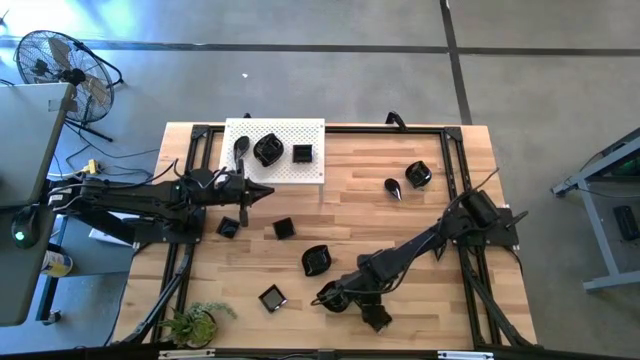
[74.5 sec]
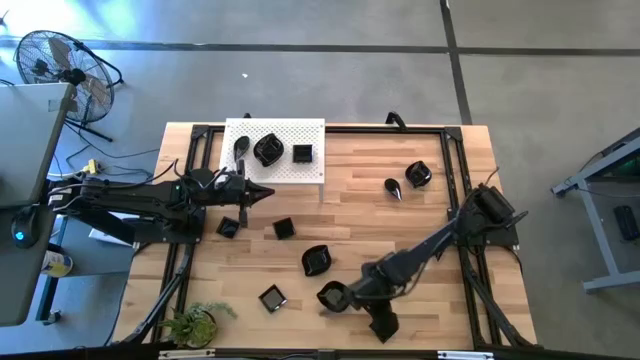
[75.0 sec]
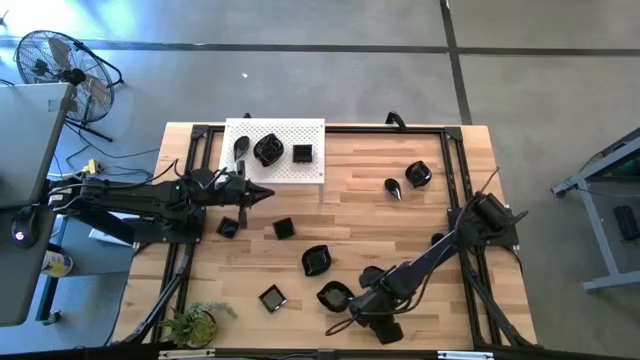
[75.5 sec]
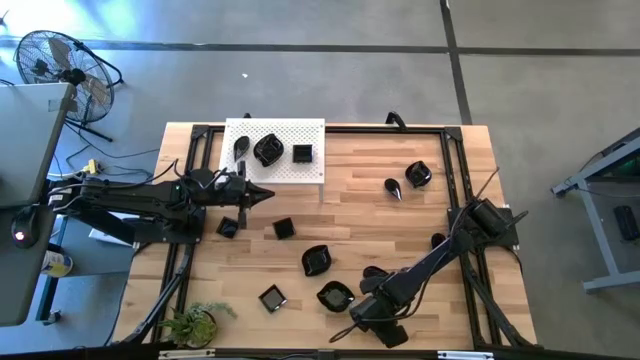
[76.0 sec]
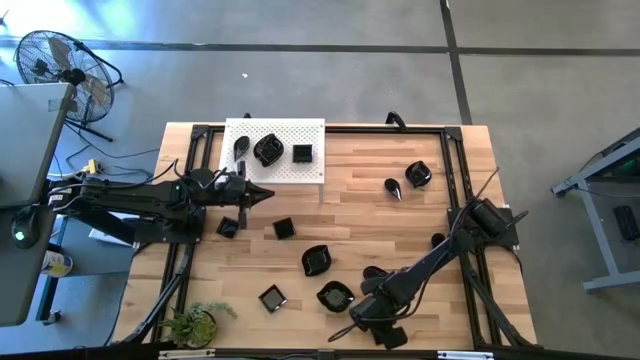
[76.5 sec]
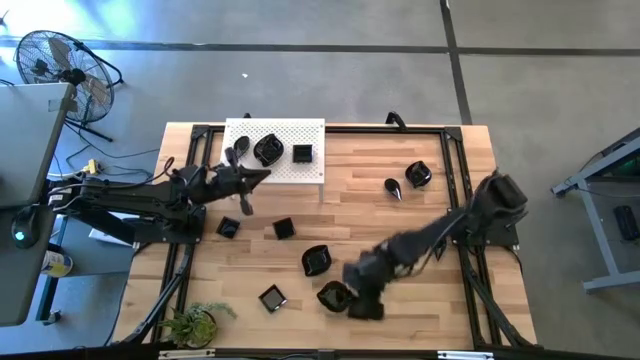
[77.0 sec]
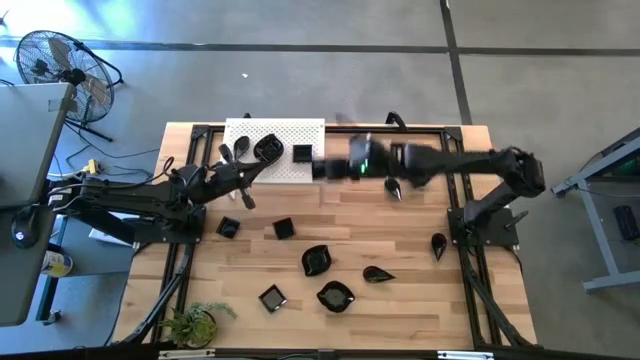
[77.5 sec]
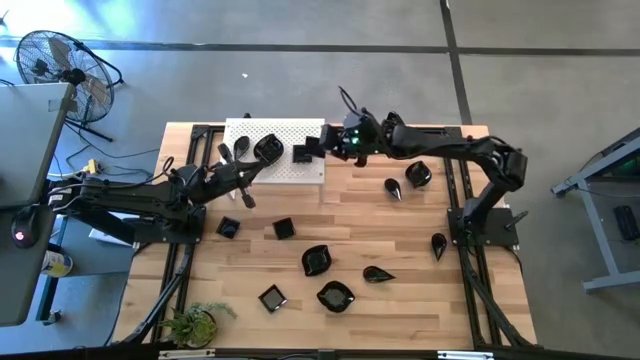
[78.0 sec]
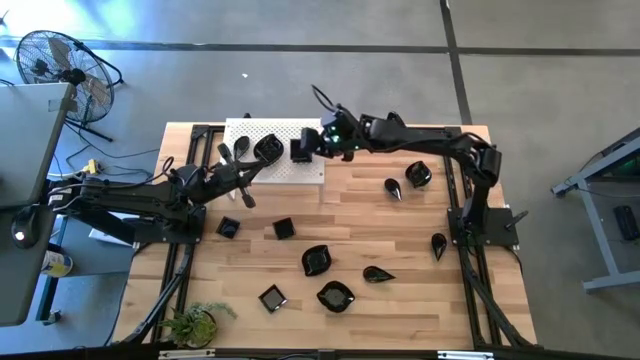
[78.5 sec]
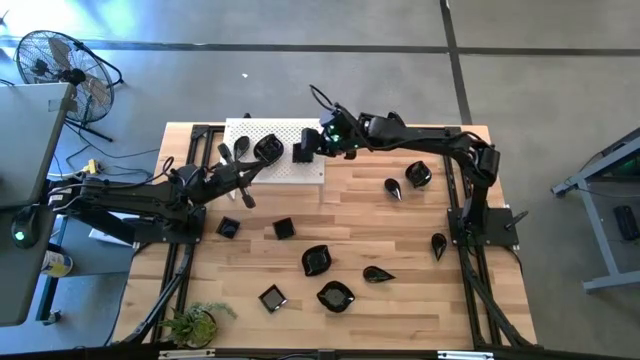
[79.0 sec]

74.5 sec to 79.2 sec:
Task: Pick & Place Mini shaped plates
Stack the square plate on top of the square plate on the shelf

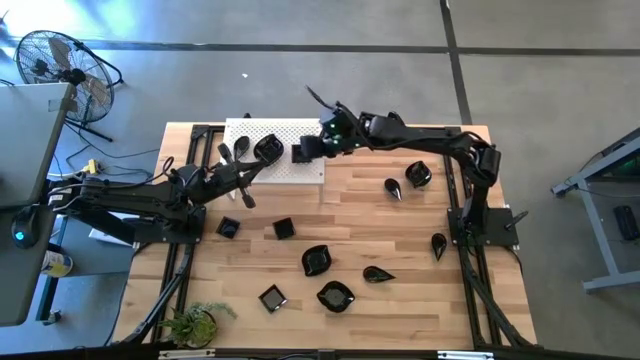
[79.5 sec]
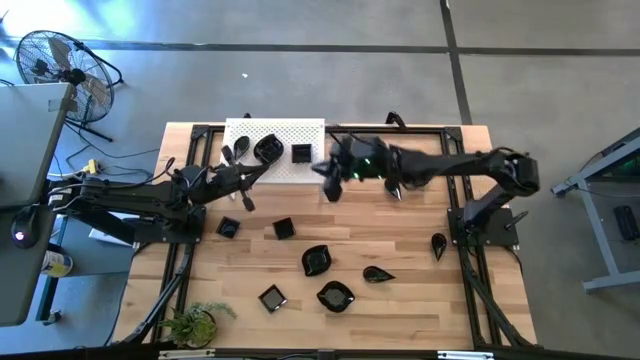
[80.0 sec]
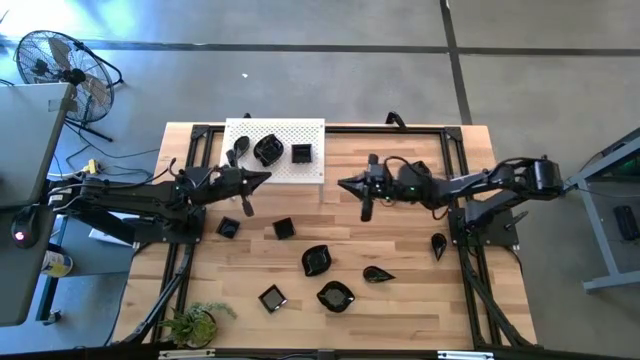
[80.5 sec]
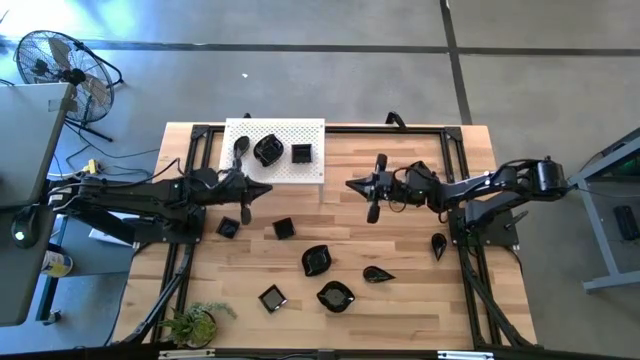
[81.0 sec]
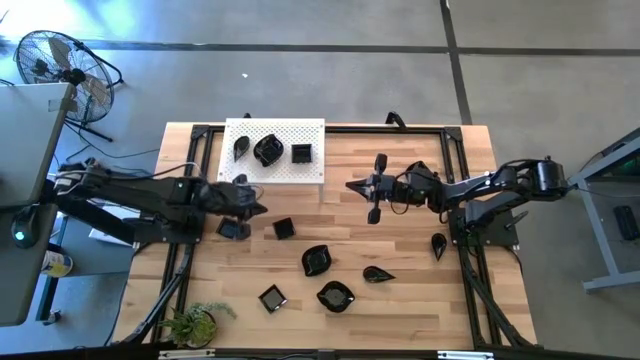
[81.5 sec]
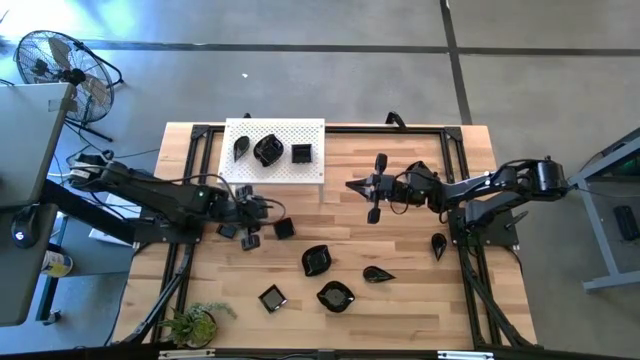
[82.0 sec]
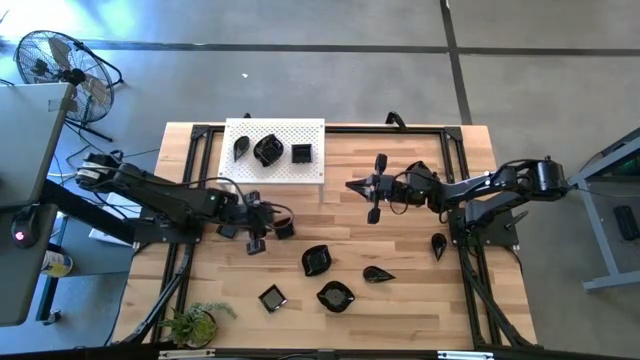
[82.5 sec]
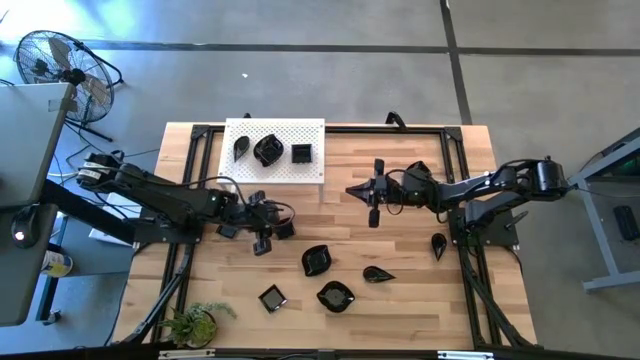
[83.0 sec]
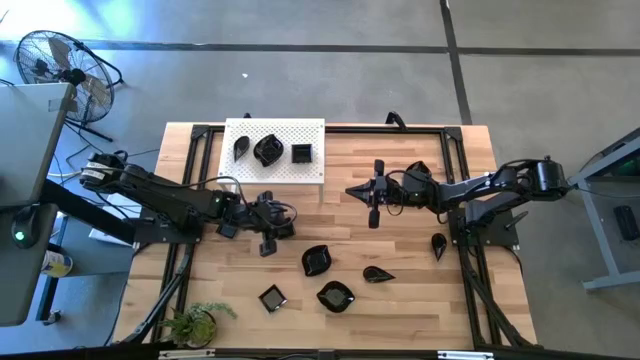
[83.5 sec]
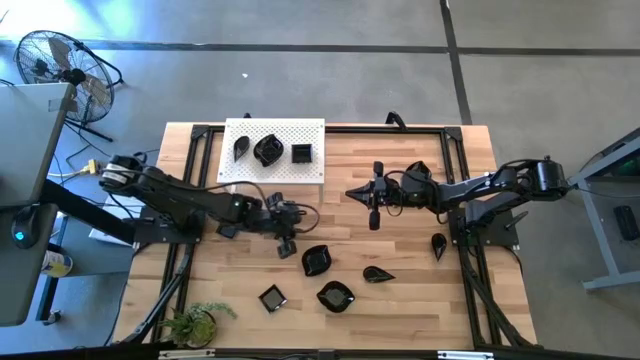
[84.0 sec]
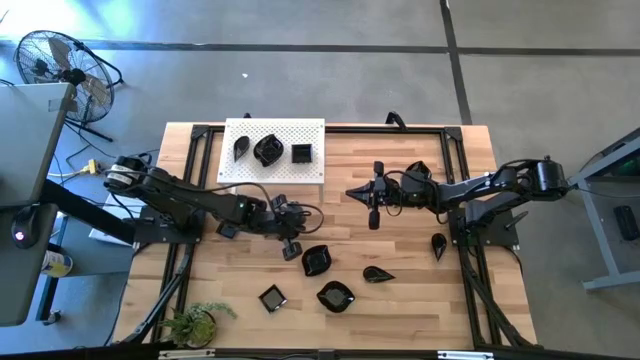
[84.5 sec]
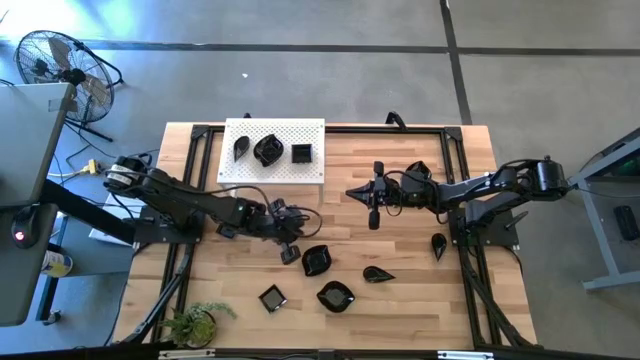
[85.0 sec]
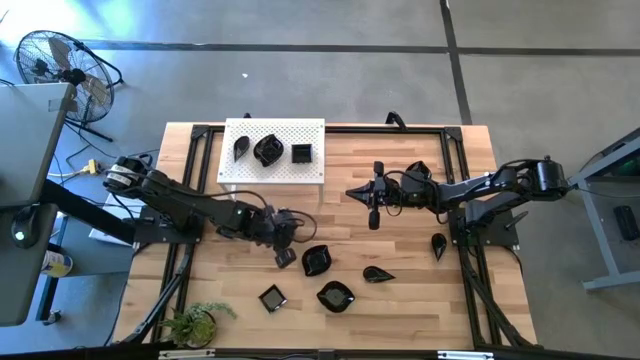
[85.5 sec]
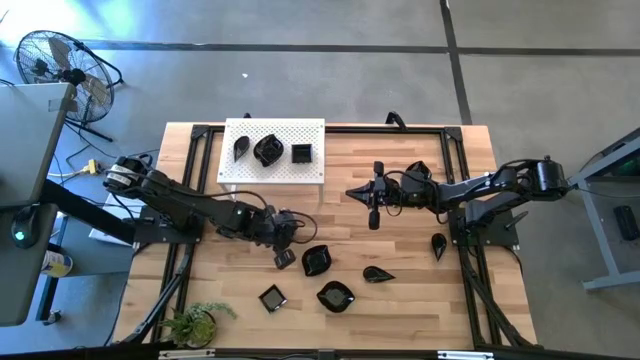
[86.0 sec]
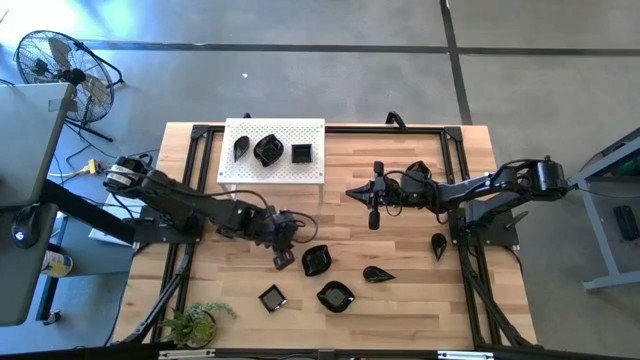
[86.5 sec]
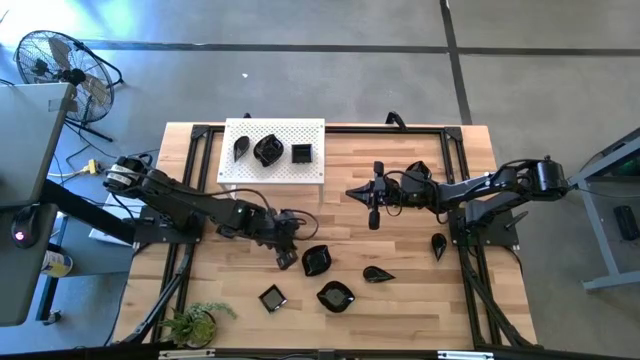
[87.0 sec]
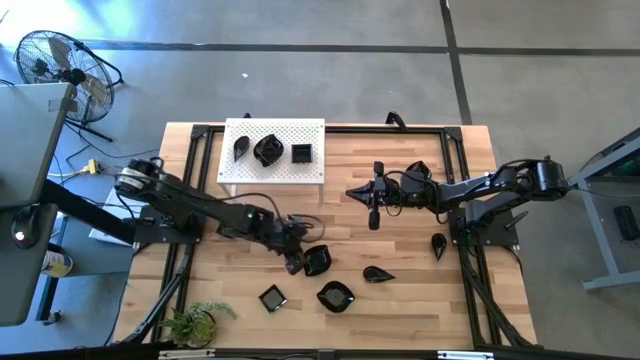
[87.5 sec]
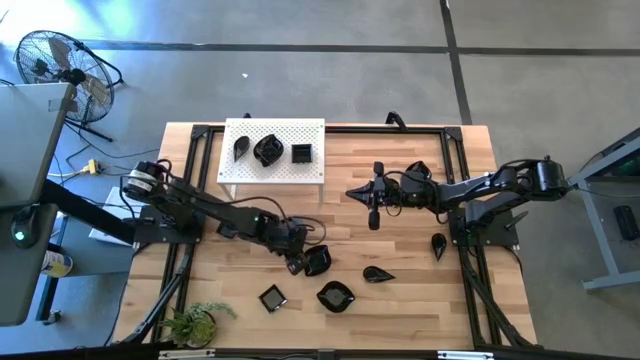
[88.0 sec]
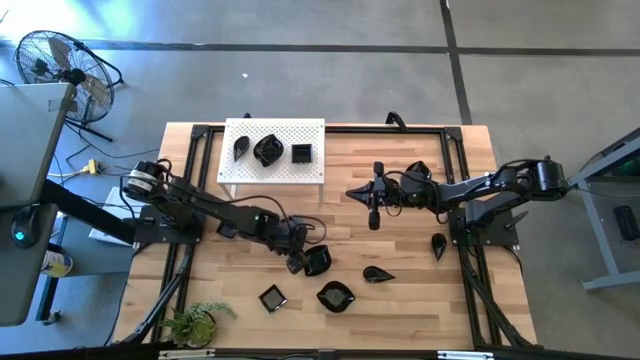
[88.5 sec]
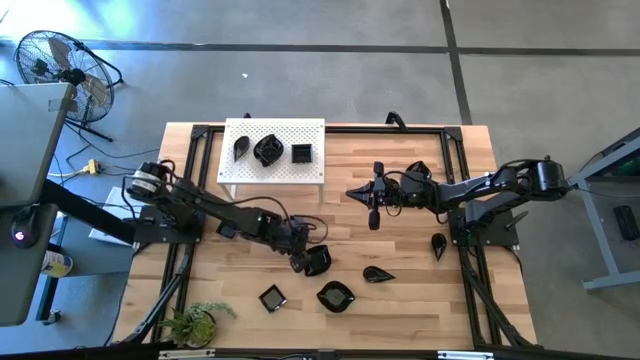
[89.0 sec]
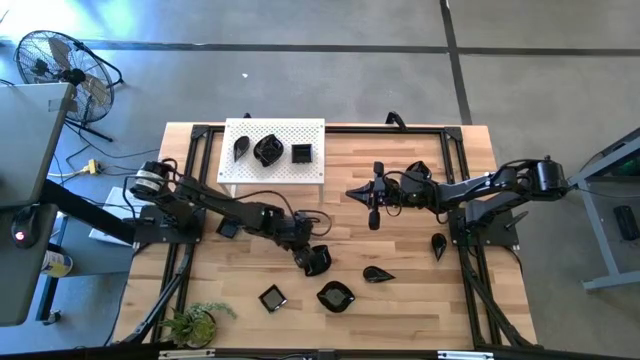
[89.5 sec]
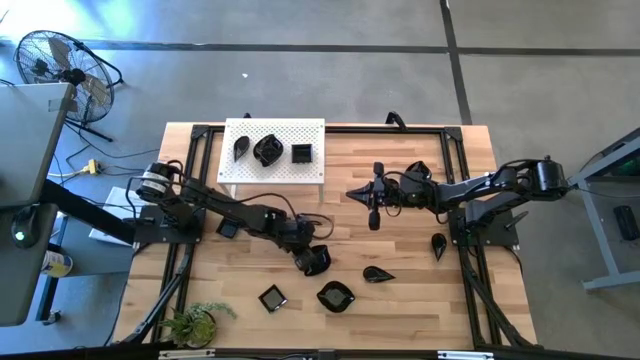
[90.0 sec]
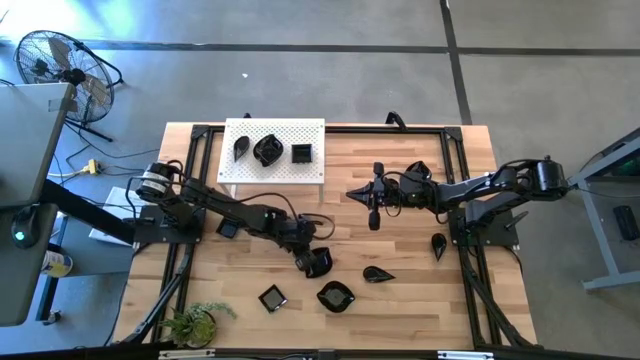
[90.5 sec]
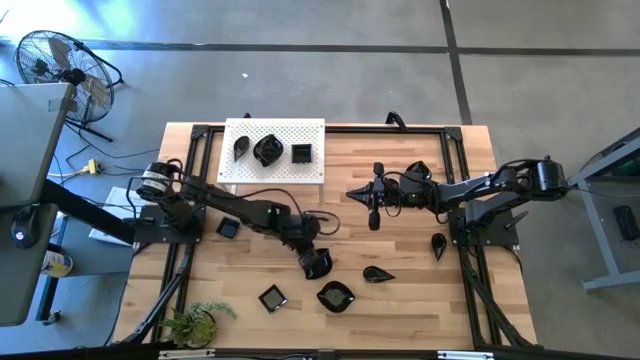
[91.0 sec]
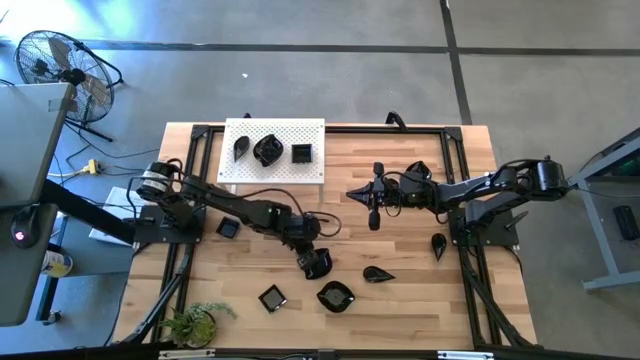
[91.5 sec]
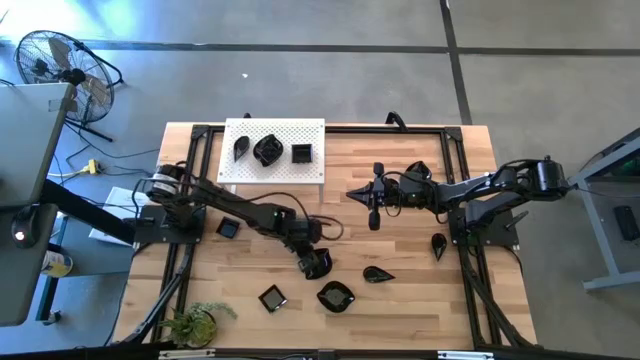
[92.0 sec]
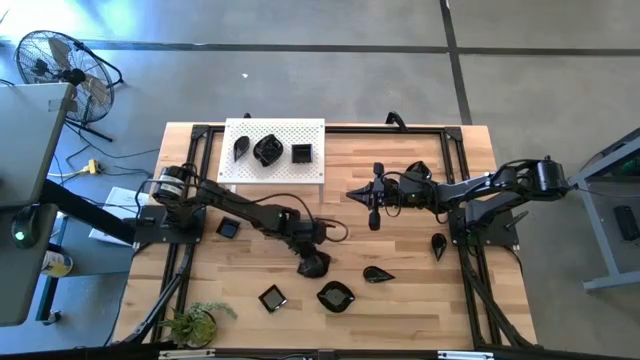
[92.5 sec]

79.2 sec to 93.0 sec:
Stack the leaf-shaped plate on top of the leaf-shaped plate on the shelf

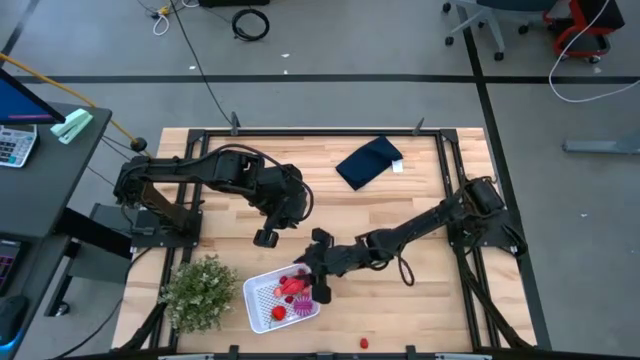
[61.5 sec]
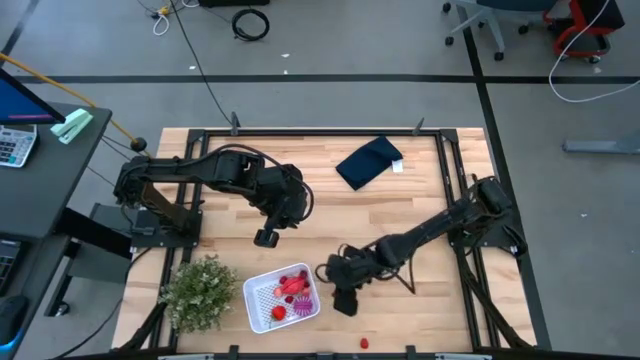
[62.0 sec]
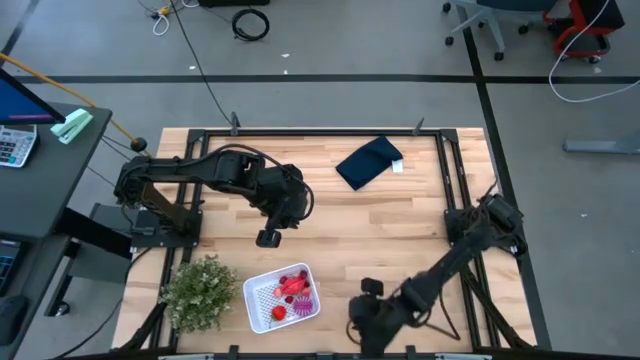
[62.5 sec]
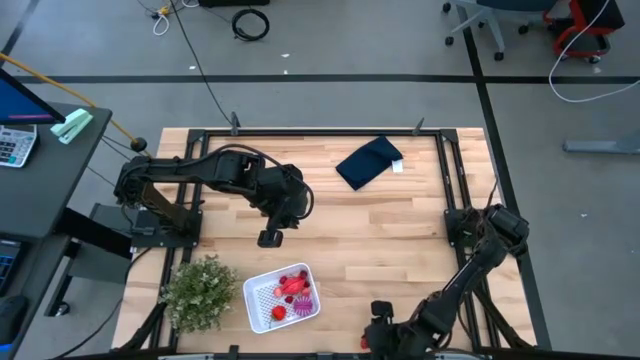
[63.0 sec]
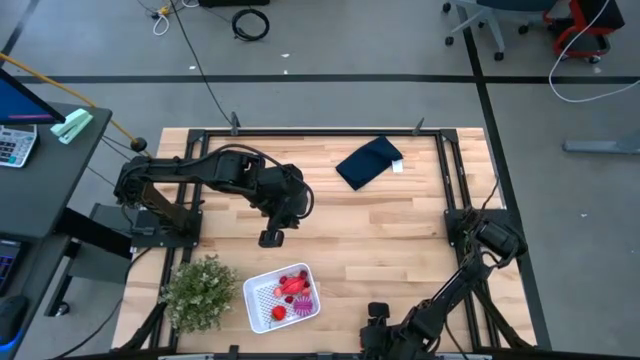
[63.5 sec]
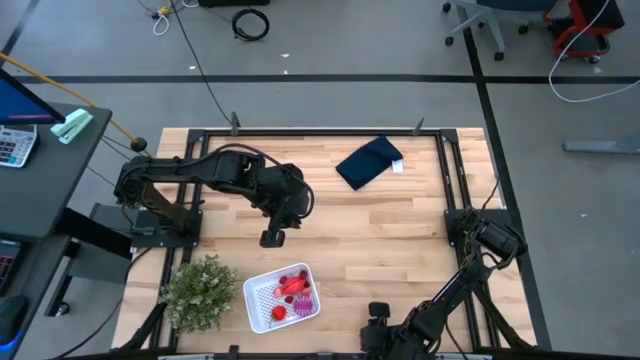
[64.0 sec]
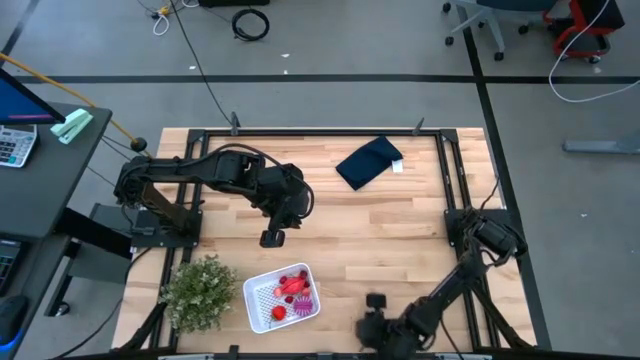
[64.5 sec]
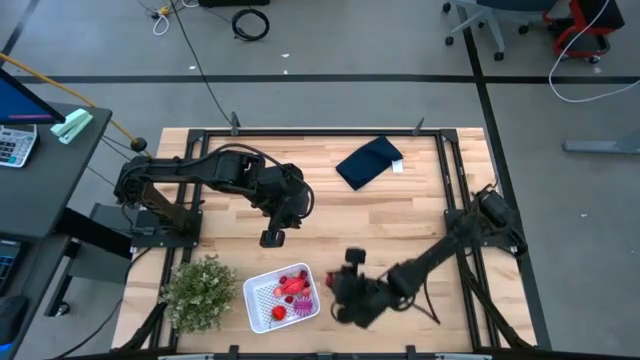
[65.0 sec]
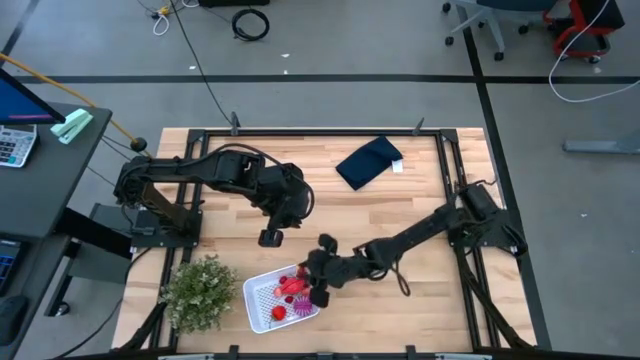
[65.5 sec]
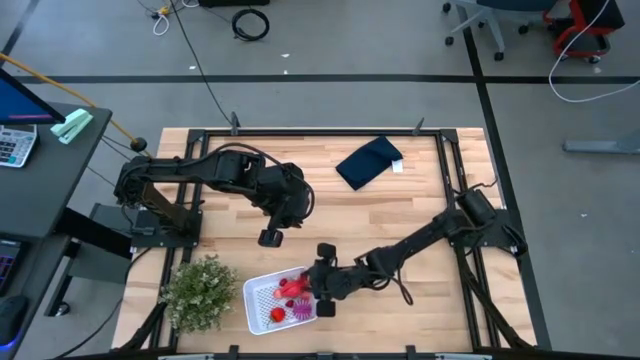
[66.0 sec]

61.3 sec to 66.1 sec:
Task: Pick and placing Produce into tupperware
Put the raspberry into the white bin
